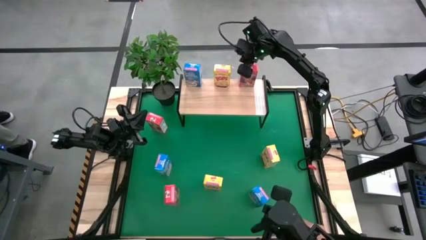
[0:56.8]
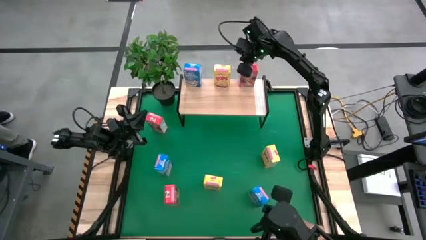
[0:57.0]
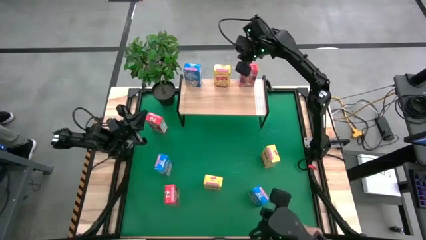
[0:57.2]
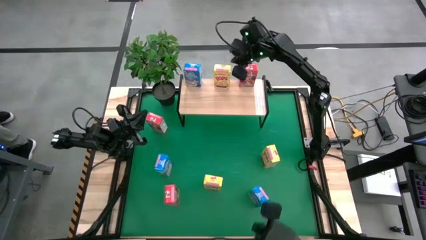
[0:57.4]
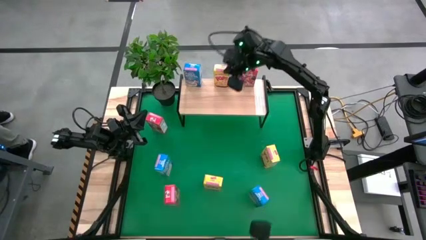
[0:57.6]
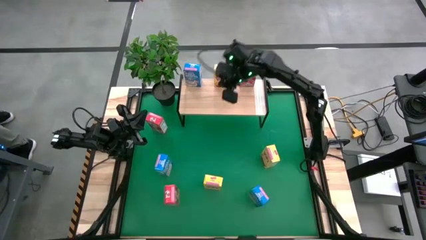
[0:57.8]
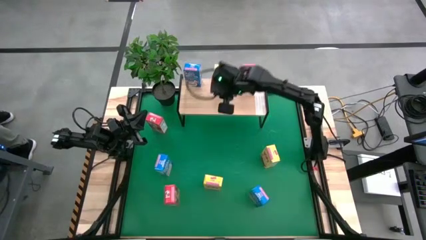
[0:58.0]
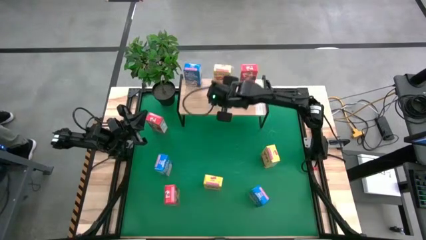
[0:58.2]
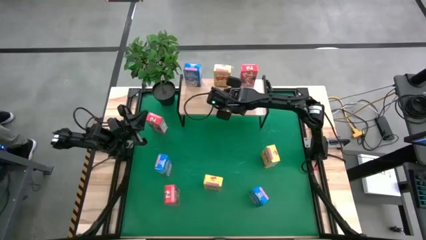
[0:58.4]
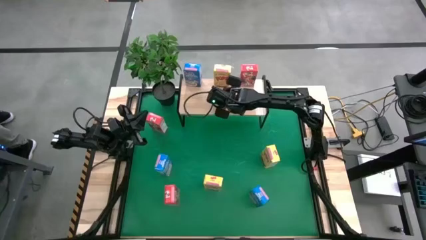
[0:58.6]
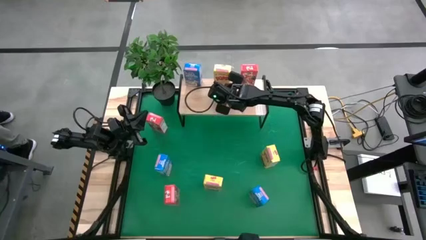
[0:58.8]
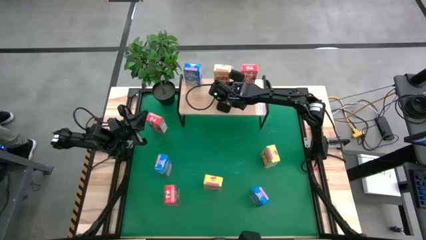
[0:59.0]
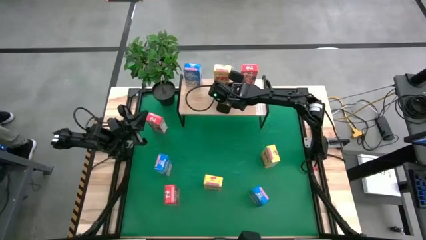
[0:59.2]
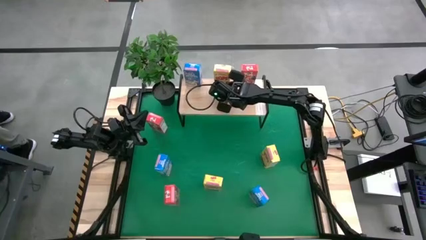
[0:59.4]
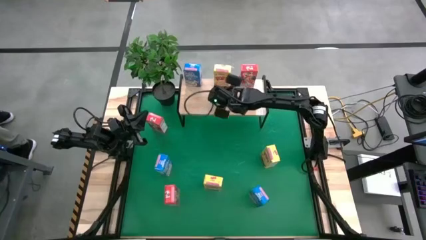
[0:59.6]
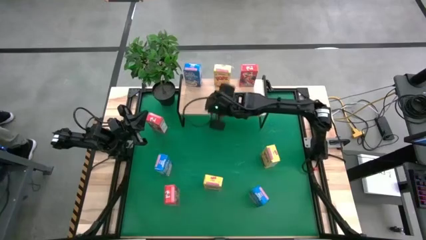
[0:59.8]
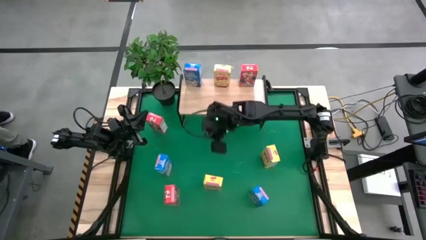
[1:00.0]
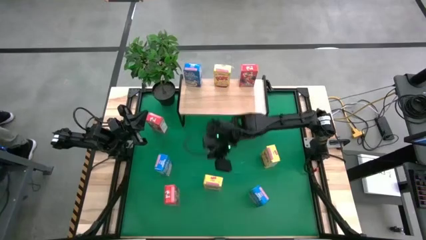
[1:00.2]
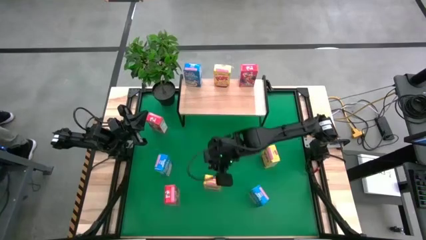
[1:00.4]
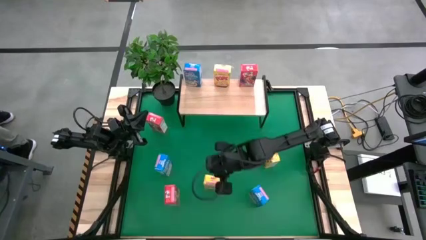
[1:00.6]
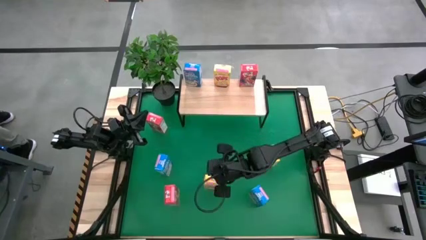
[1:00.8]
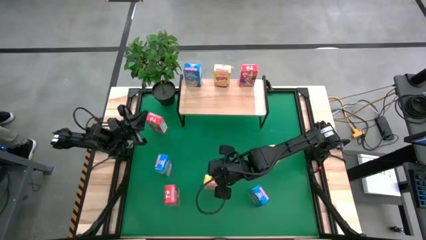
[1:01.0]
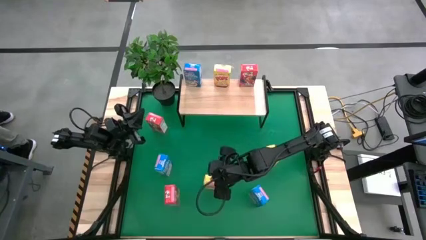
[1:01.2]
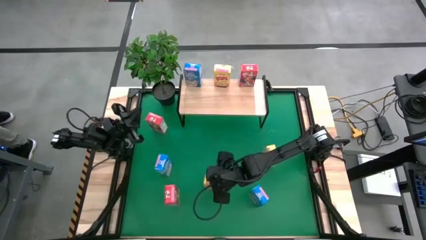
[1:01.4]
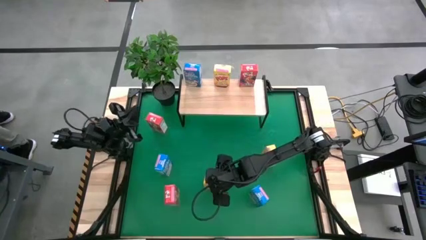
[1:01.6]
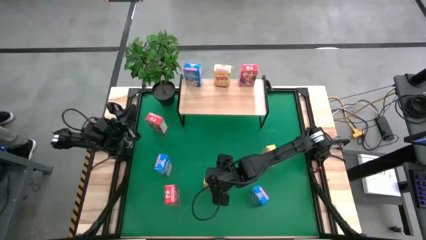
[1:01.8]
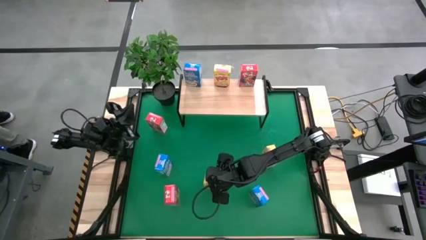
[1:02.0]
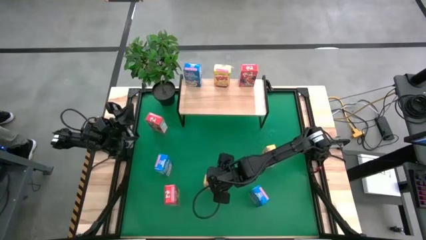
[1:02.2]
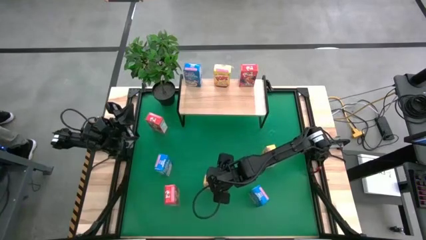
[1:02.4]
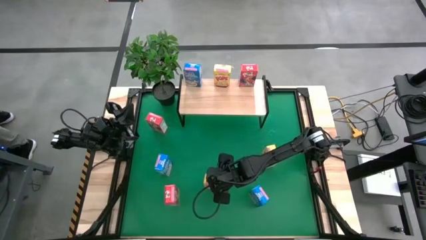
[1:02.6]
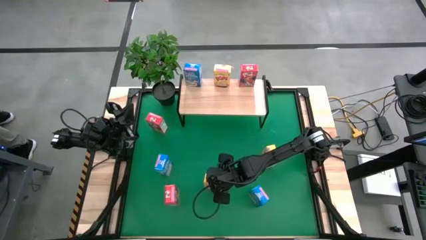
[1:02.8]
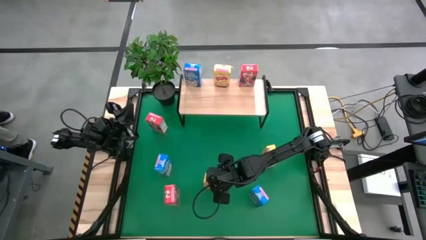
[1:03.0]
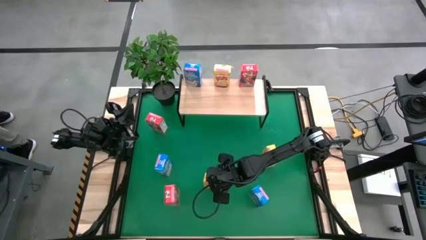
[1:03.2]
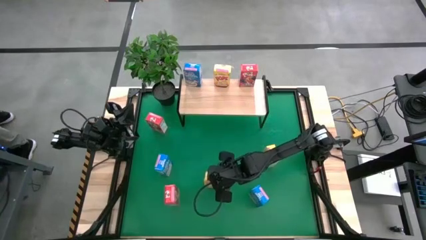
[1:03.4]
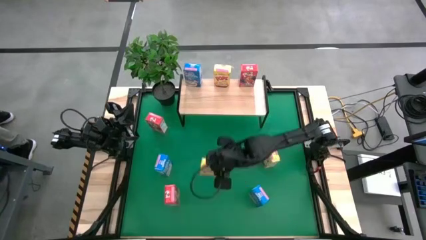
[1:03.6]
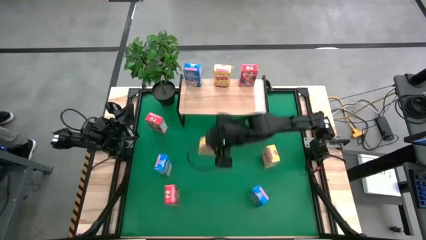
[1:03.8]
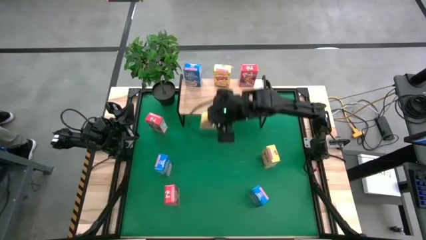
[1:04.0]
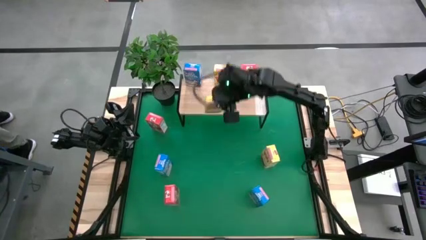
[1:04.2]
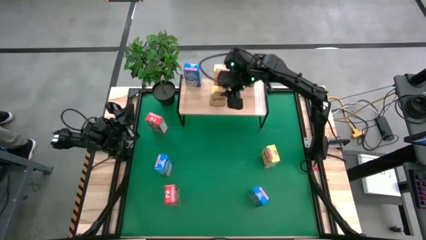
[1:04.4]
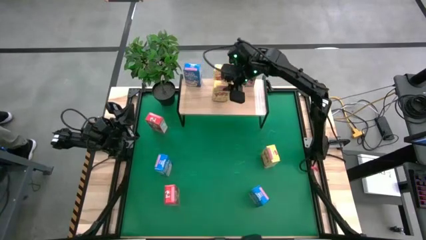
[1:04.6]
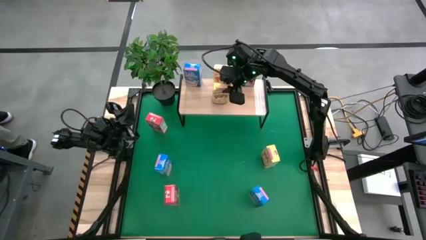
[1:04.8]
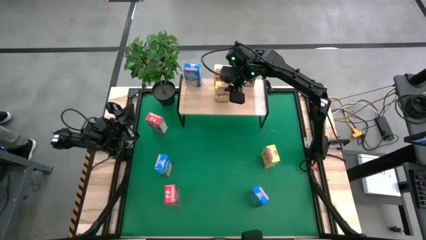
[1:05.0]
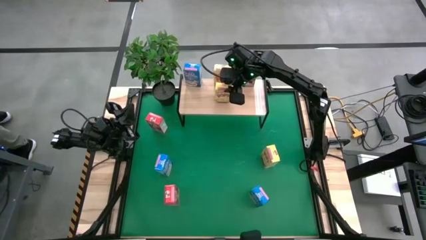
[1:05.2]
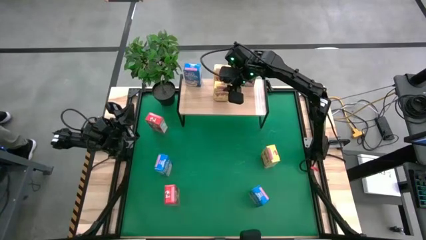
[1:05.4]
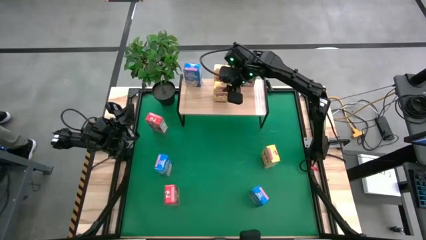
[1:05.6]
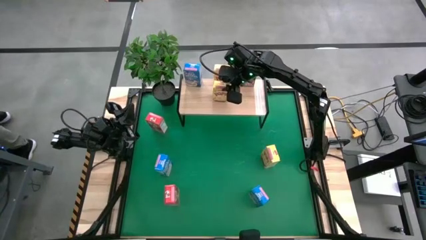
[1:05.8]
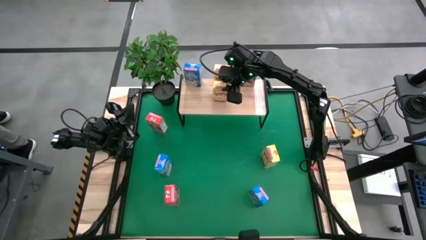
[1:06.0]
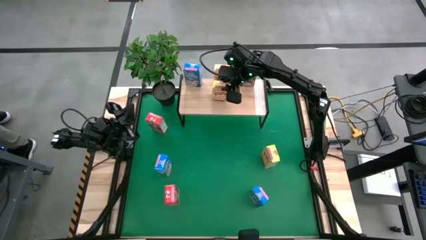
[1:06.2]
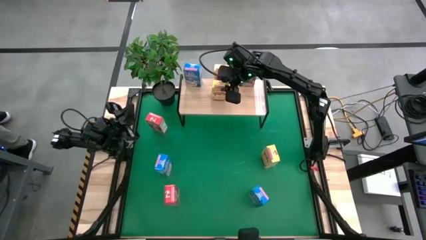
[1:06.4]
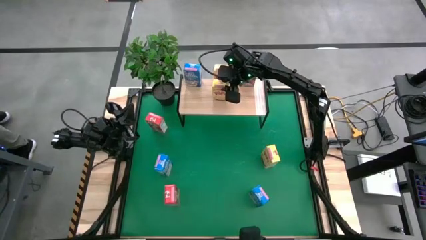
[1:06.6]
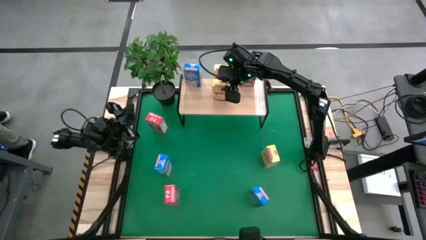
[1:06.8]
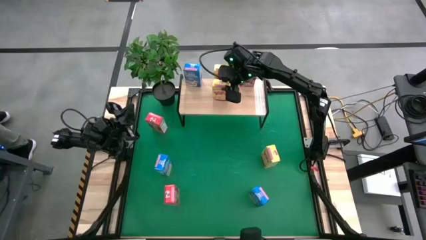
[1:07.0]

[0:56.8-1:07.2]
Task: Stack cereal on shelf
Put the left yellow cereal box on the shelf

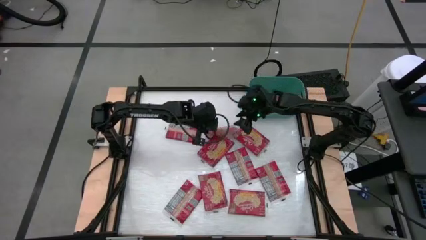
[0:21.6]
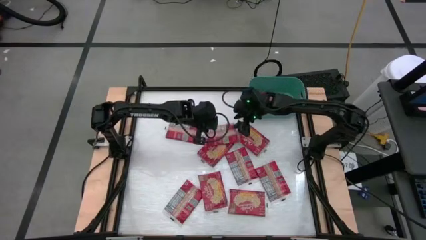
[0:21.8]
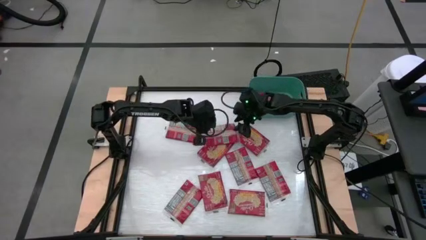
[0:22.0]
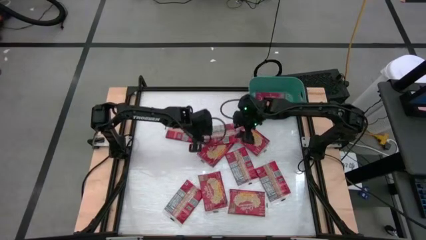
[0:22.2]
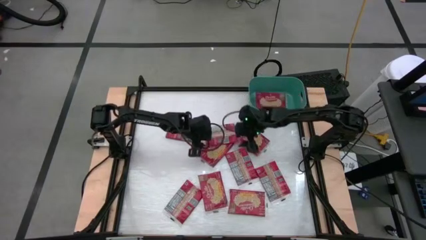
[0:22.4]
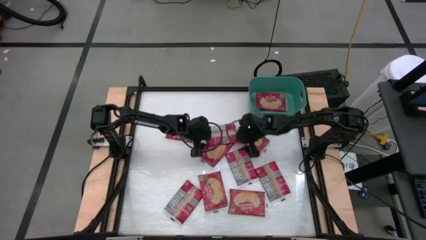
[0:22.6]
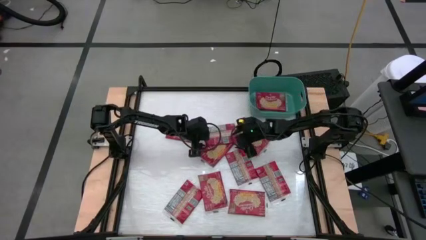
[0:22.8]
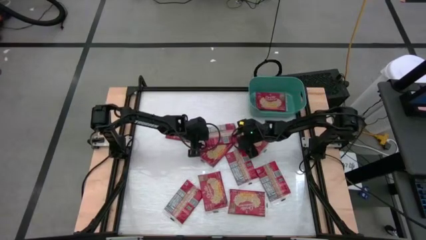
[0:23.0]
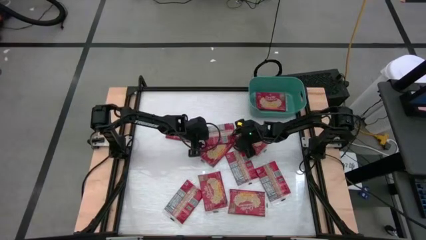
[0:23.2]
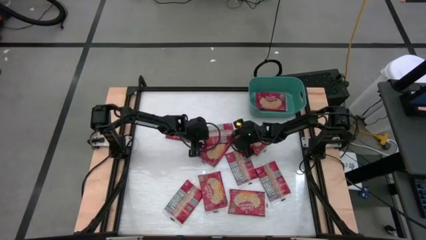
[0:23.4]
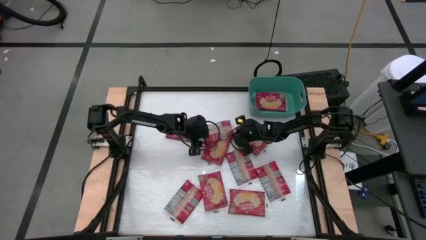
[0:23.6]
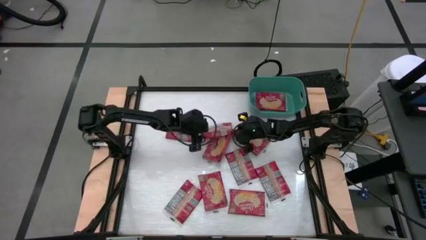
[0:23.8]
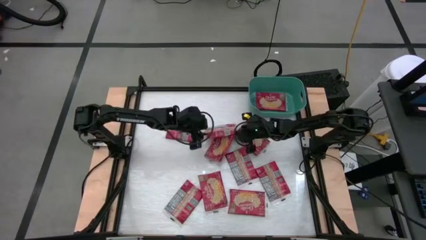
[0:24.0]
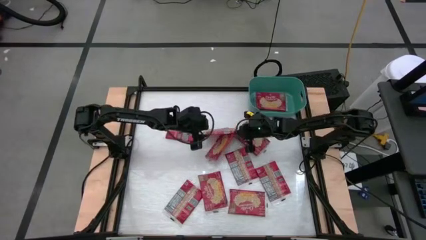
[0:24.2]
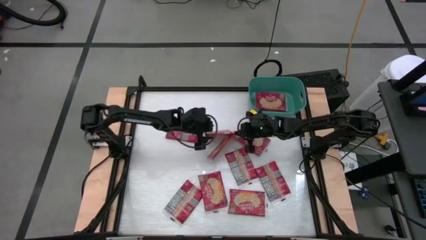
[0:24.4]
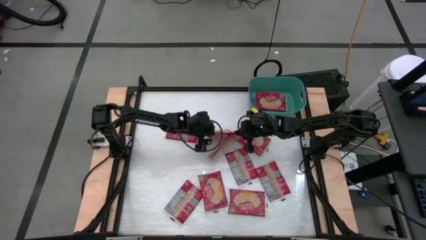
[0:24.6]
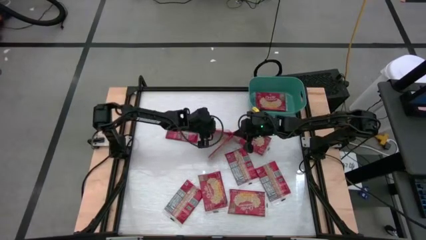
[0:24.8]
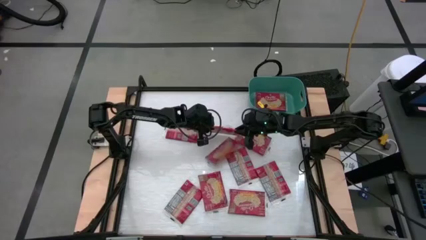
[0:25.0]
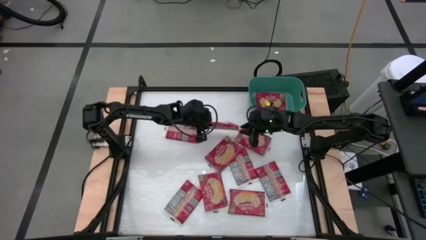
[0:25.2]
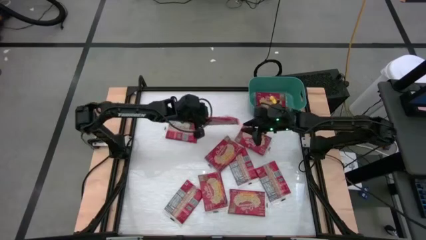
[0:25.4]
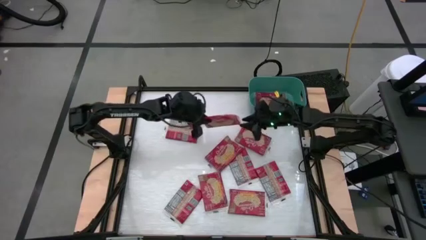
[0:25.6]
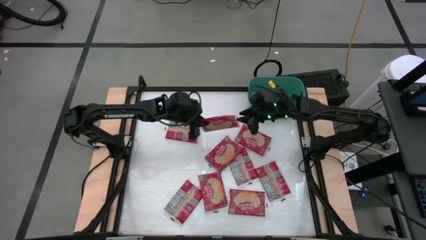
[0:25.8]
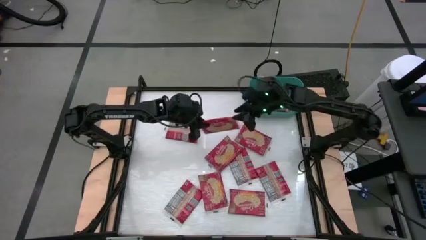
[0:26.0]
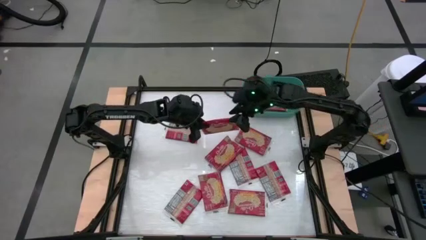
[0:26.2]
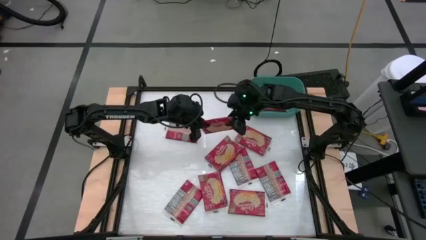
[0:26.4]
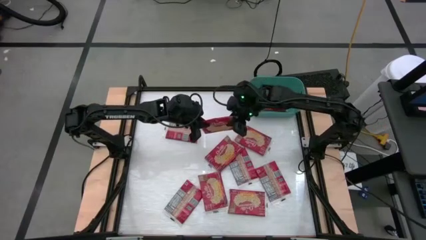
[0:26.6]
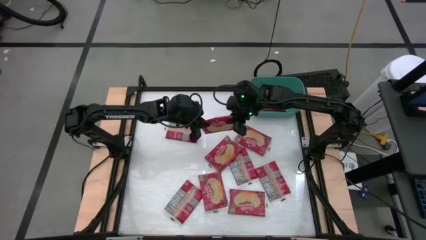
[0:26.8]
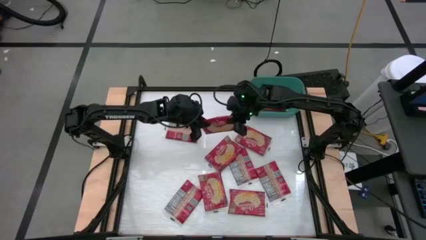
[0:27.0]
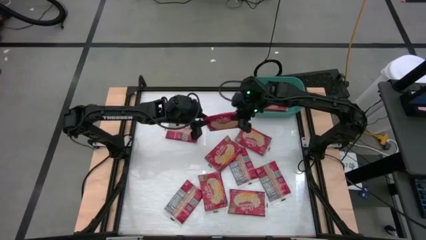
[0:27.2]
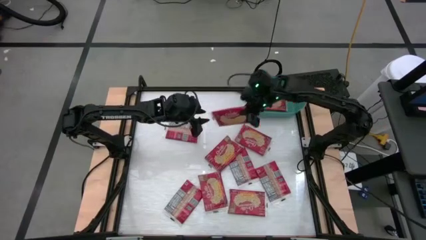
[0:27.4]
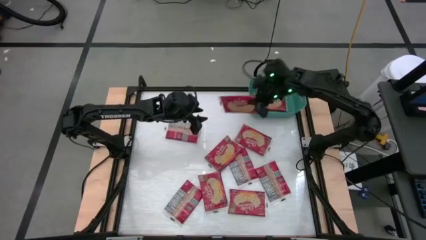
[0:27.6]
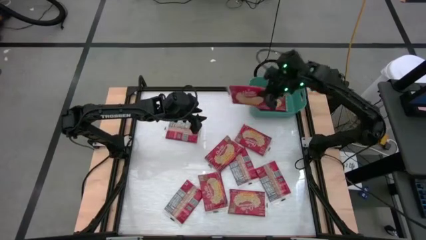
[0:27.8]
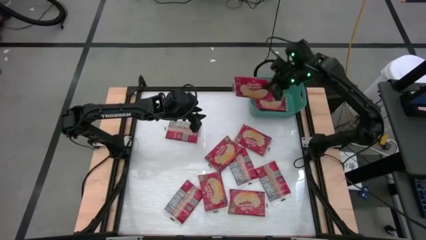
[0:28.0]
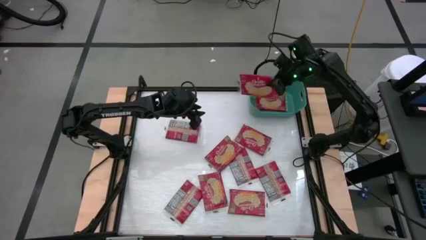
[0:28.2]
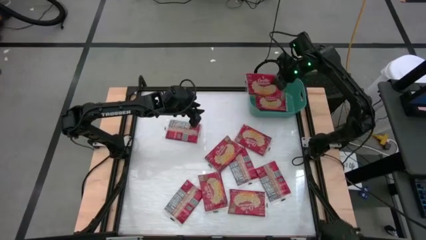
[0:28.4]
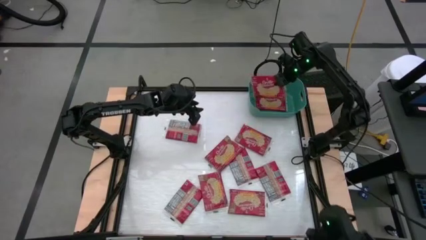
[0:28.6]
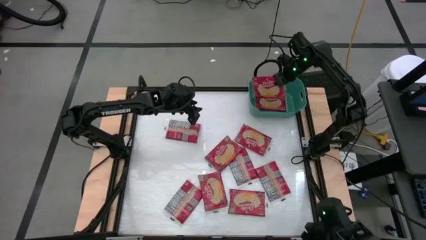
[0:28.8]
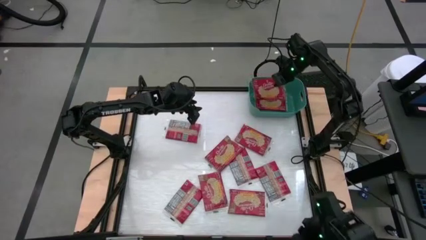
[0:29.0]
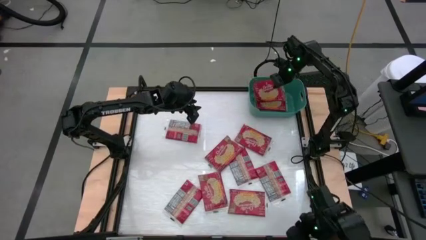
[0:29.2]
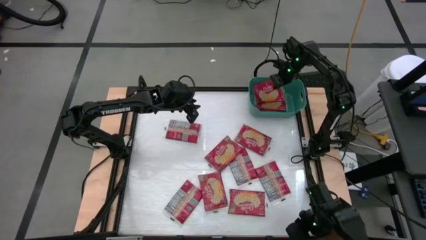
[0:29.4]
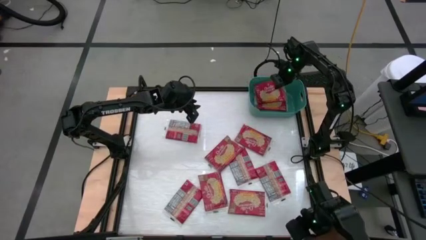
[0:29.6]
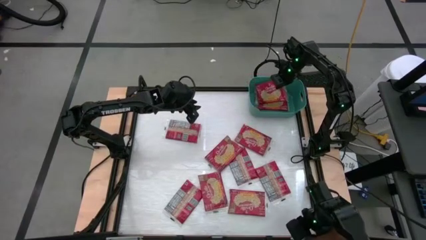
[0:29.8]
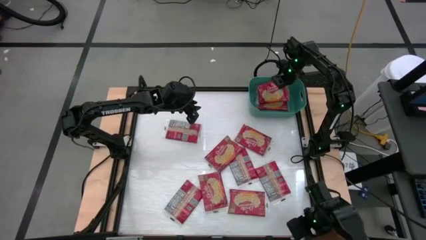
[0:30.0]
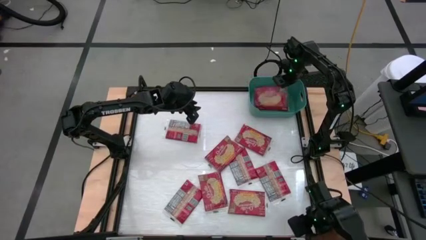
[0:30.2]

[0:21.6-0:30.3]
Task: Sort popcorn bags into baskets
Put the red popcorn bag into the green bin
